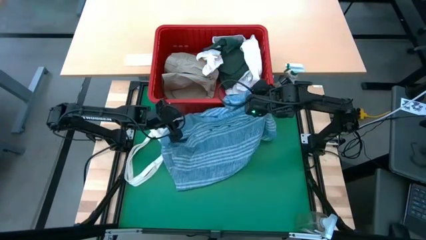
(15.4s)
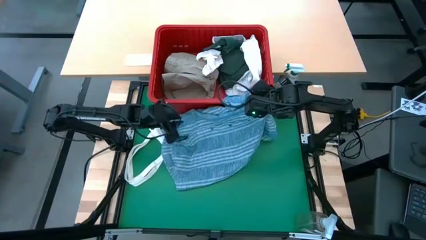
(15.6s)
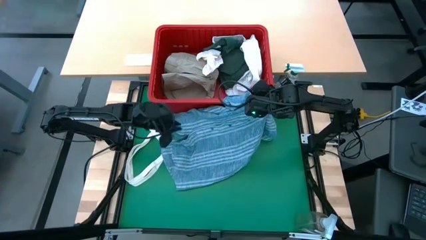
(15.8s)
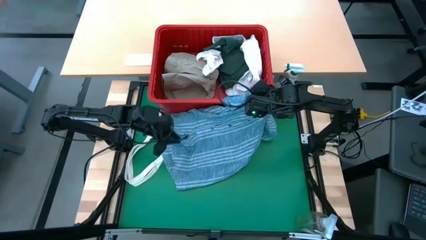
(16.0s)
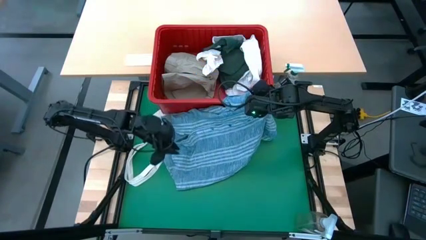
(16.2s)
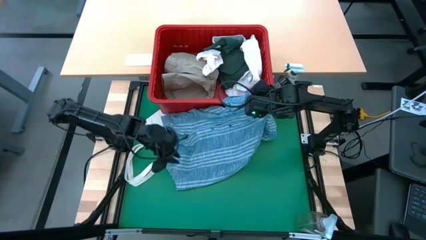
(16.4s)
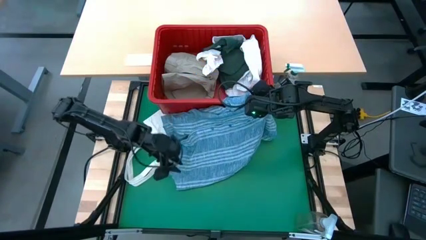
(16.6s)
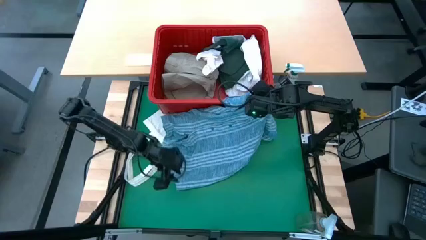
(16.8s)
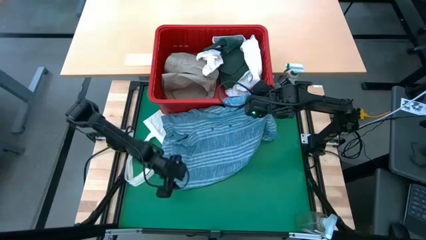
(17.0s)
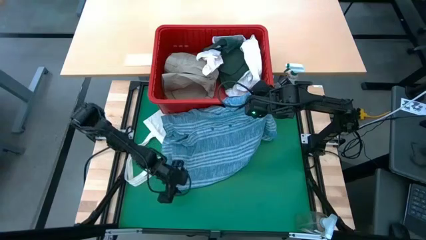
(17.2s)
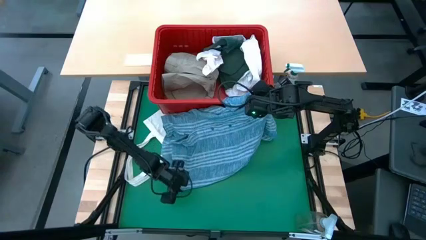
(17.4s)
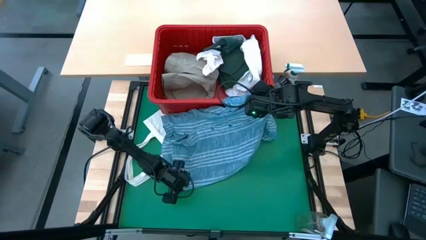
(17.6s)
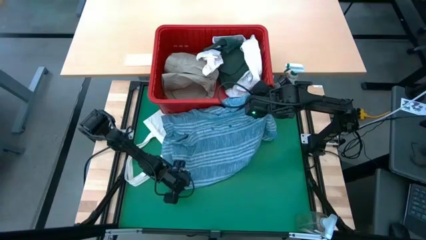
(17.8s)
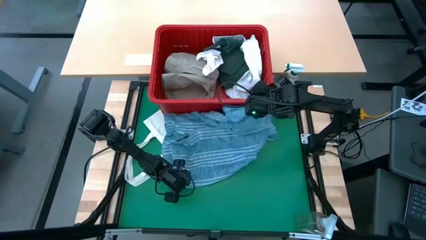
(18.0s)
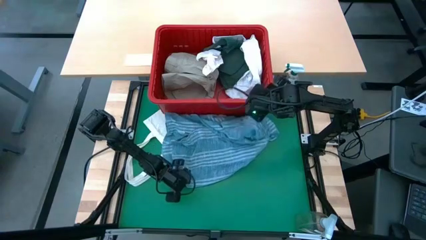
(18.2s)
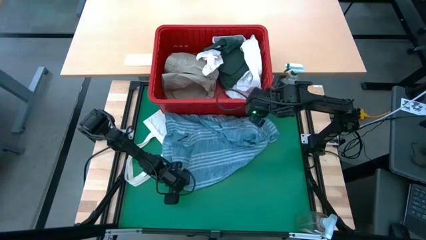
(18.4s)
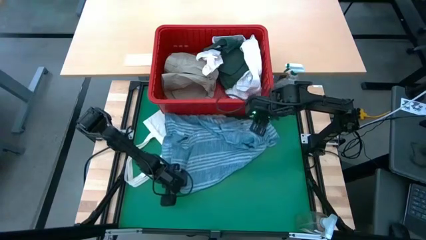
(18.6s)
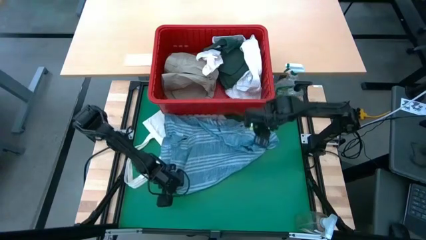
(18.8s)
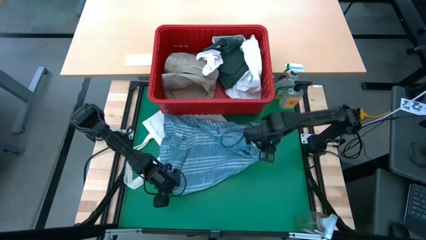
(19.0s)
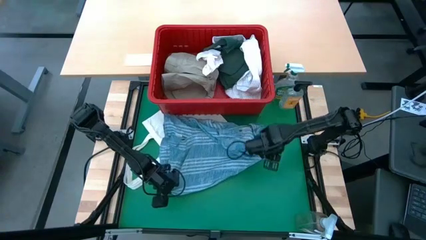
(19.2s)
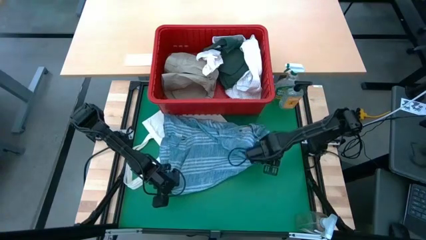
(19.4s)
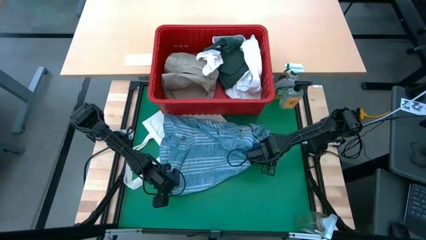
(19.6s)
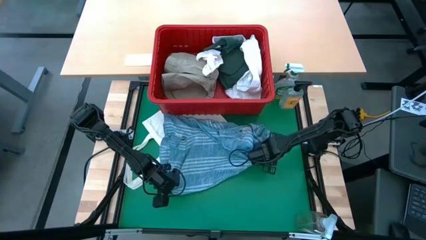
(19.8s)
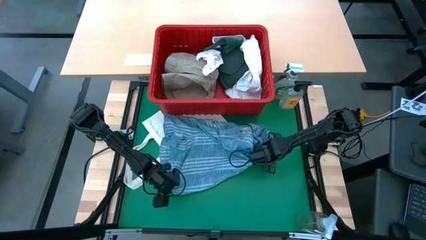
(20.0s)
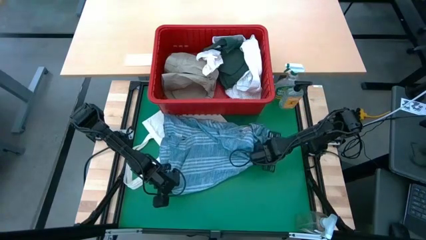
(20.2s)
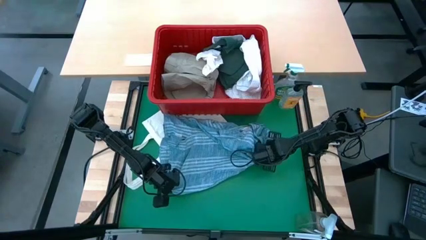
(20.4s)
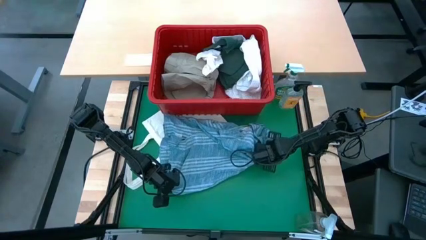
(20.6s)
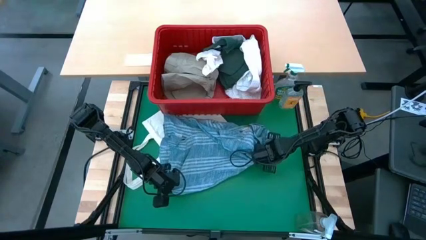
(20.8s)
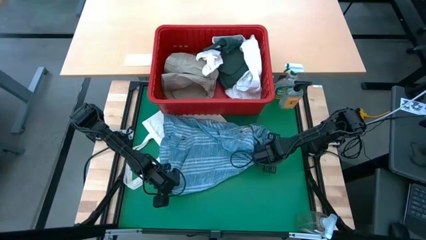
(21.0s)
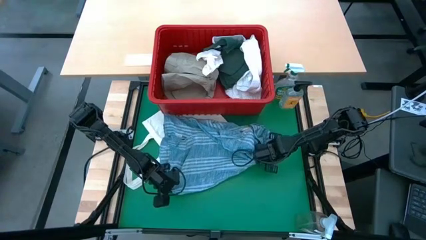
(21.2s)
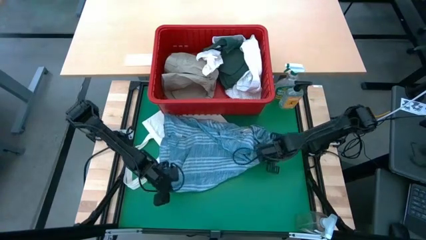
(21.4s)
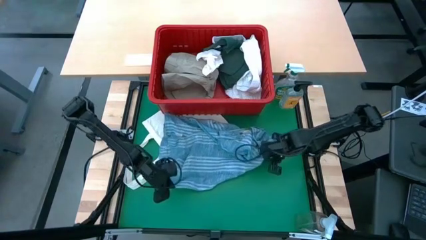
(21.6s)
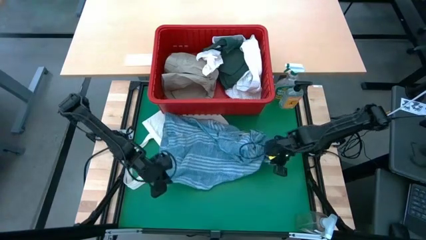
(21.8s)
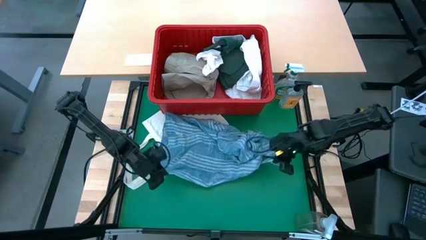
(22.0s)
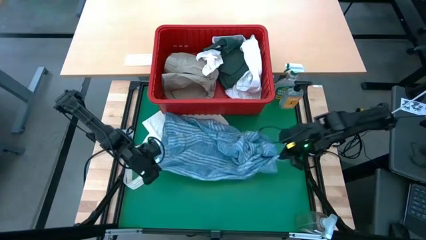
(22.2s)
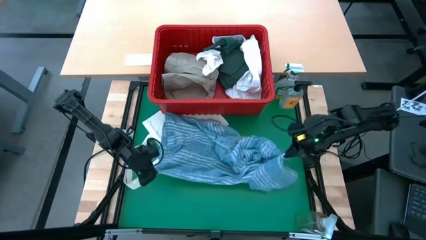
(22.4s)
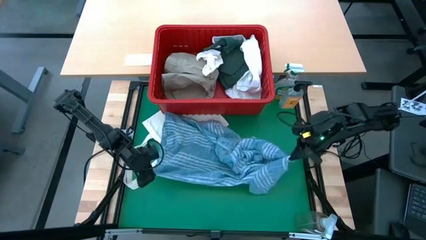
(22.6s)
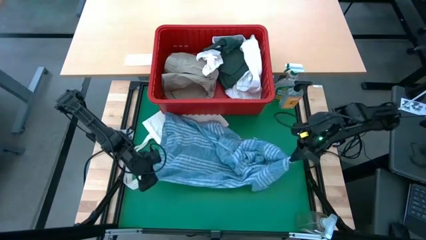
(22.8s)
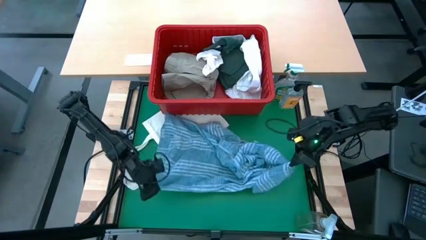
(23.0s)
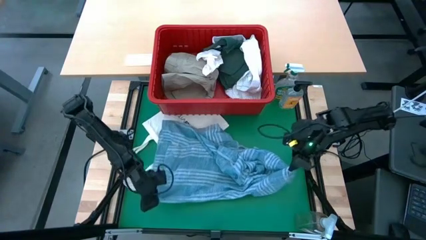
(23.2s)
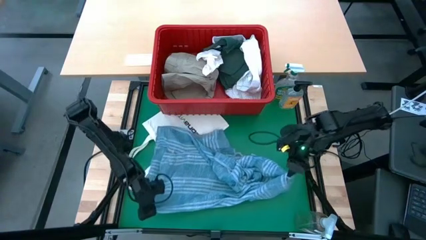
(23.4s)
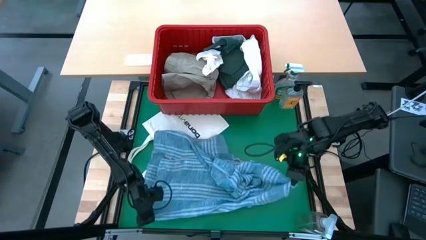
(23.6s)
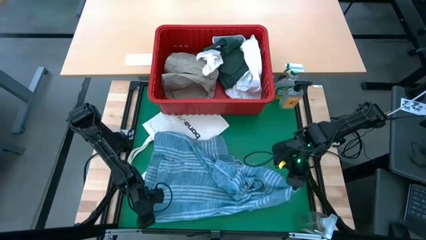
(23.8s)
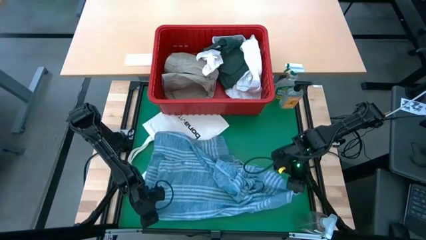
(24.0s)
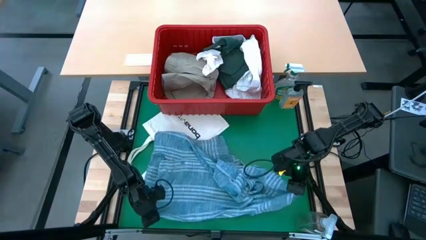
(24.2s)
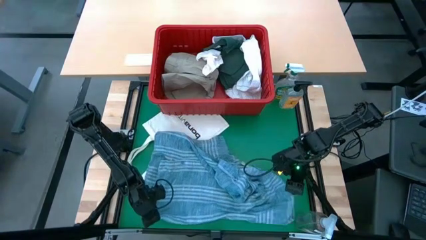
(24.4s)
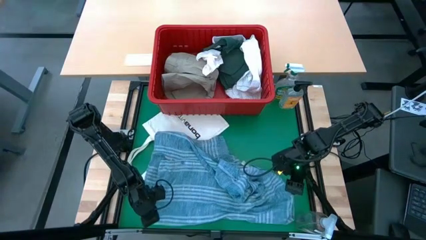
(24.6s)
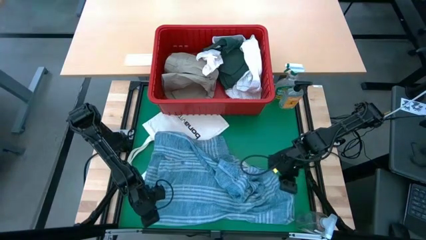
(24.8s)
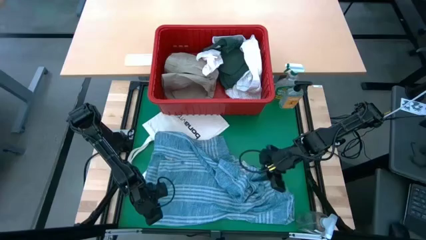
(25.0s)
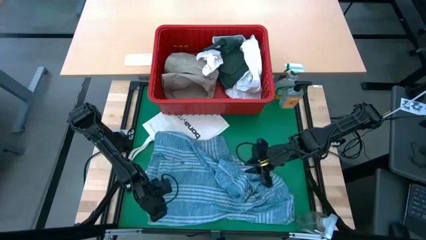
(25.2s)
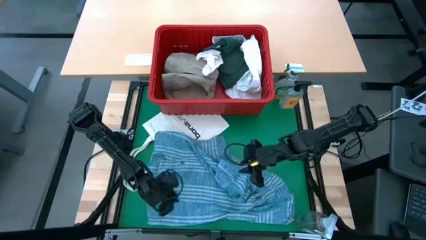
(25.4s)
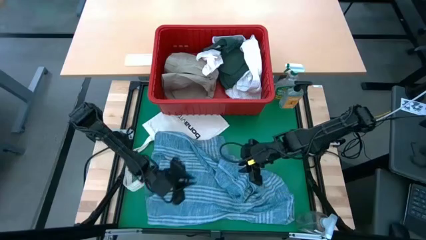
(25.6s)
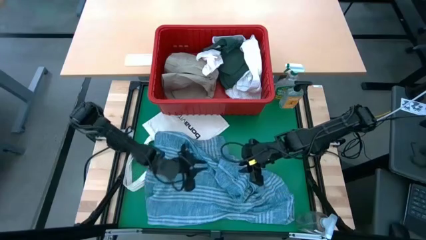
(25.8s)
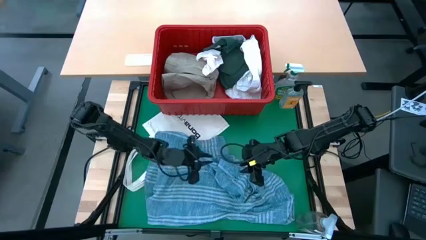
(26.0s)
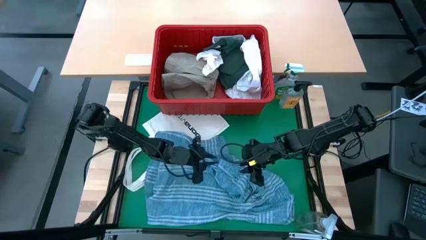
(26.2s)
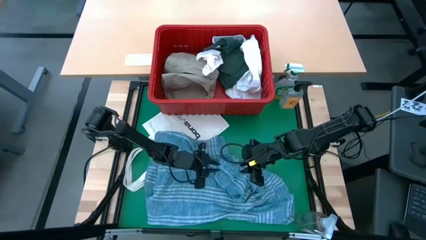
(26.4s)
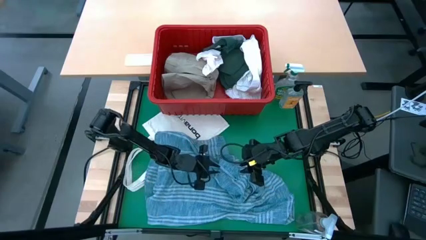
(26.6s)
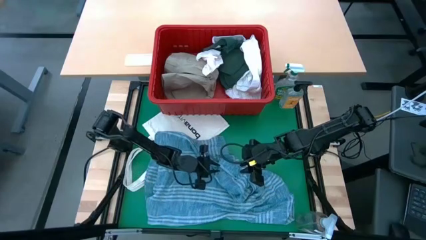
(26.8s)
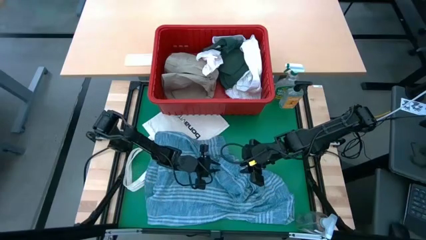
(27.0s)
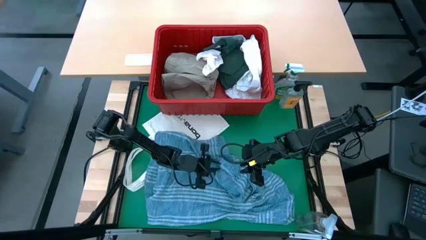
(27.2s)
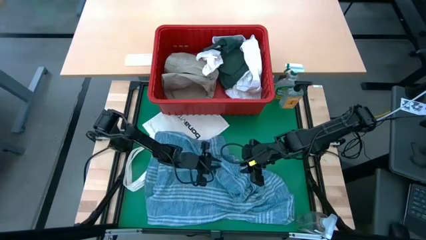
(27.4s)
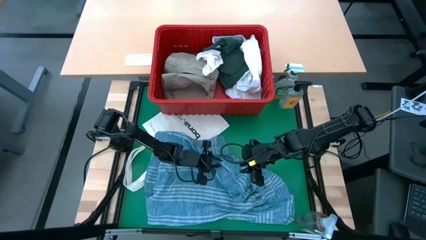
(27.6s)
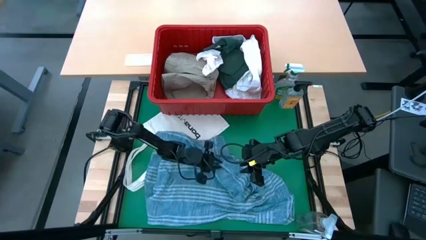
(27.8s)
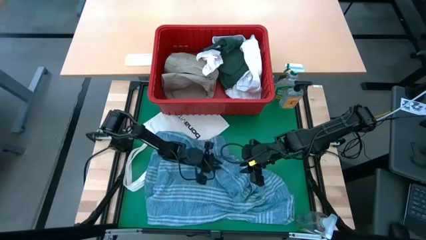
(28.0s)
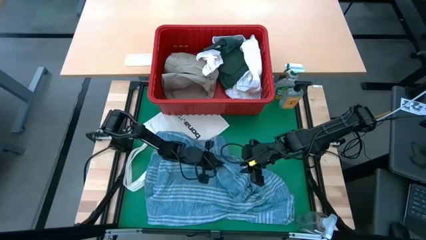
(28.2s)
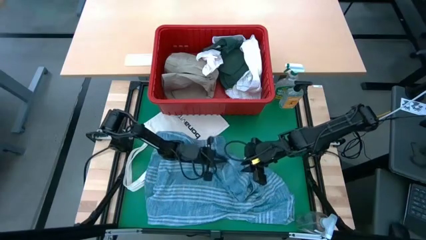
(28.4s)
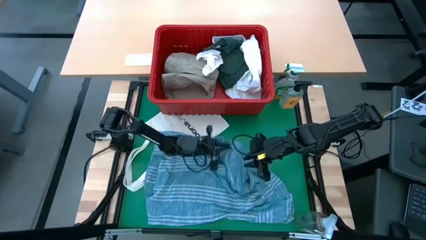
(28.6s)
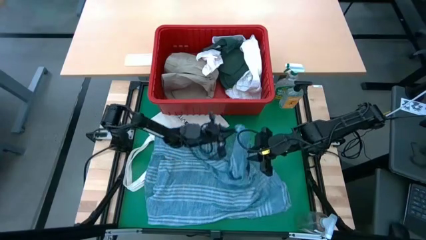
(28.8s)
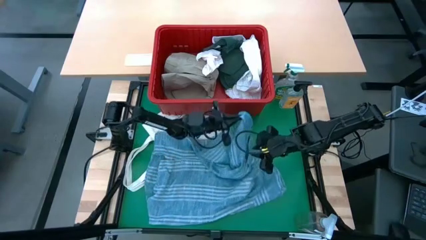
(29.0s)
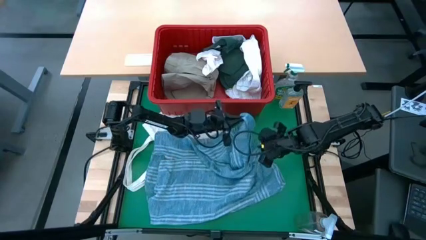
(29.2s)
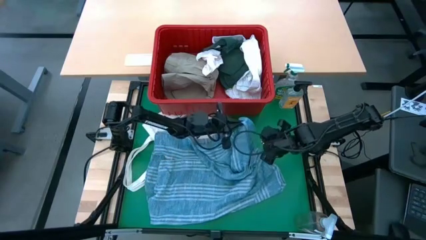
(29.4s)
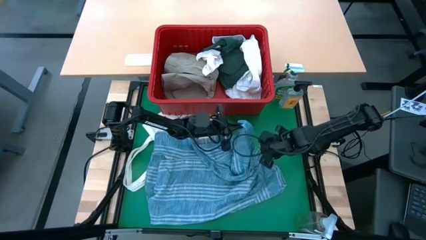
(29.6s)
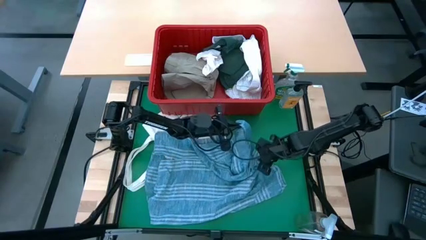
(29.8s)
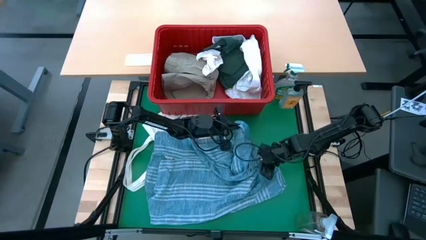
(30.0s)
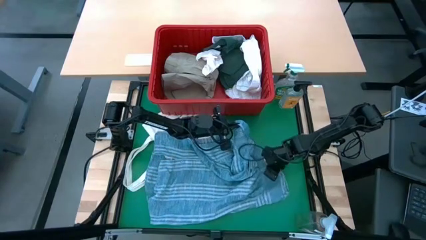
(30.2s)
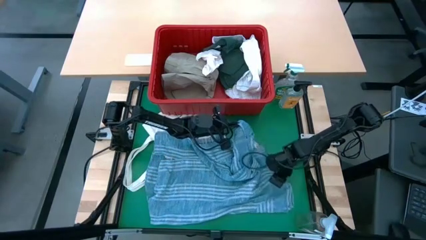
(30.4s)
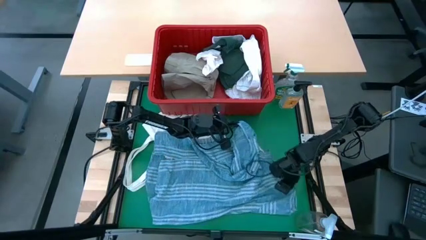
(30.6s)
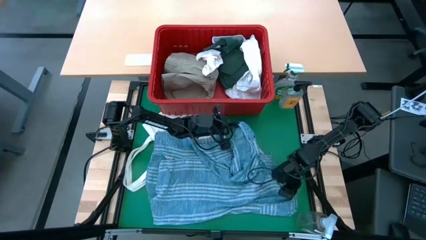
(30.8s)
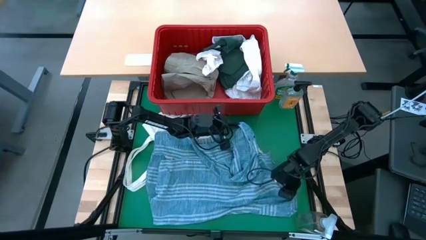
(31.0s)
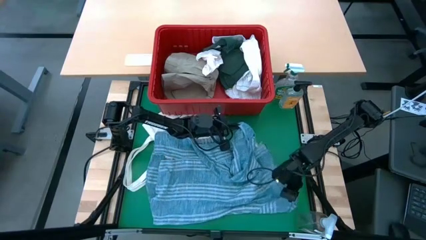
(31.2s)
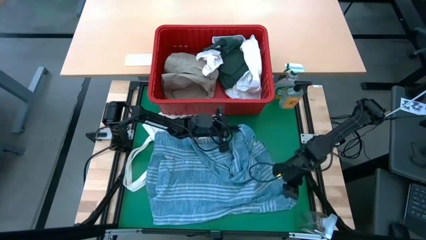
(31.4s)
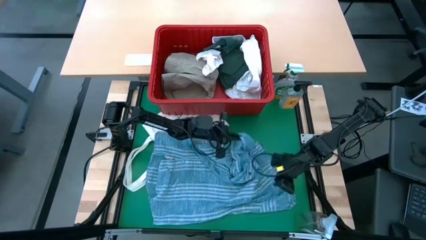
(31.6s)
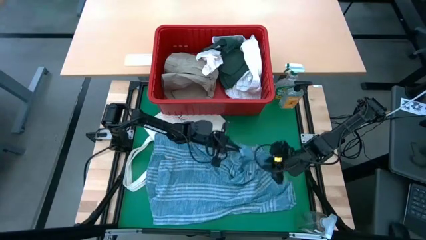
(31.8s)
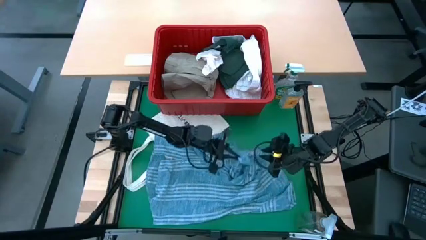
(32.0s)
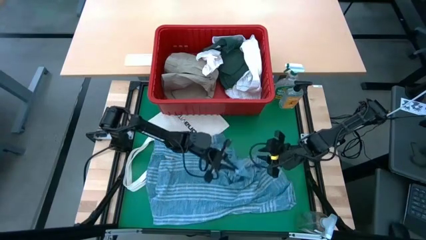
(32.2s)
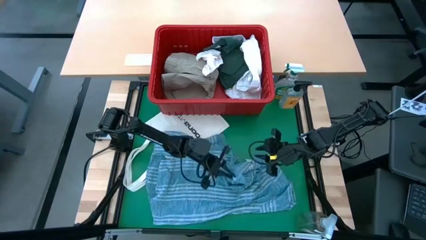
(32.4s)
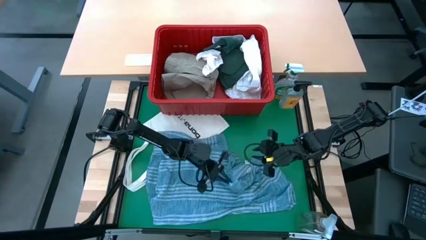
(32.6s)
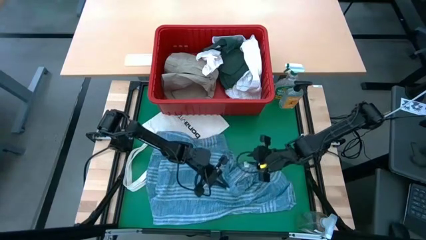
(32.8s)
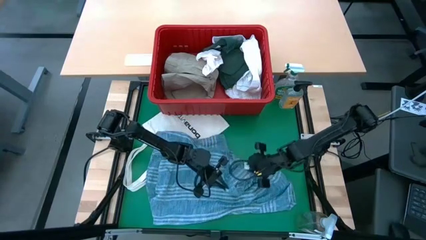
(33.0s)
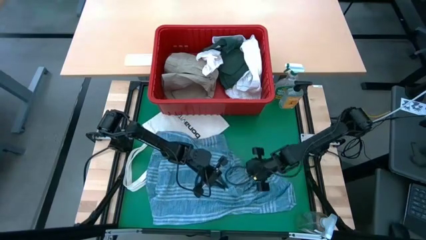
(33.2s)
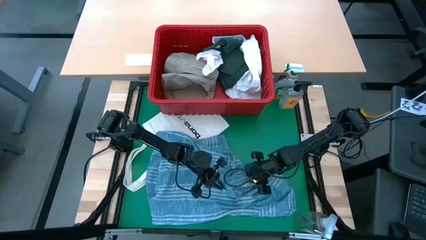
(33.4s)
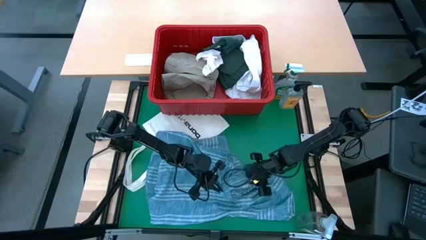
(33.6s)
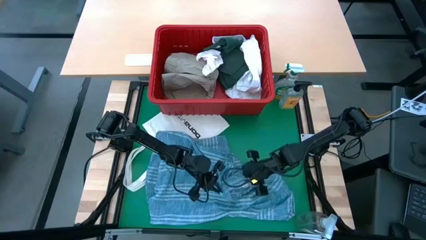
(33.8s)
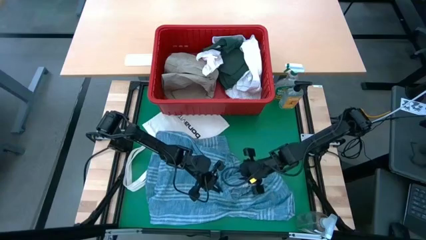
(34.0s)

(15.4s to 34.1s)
Task: Fold Laundry from Bin
Fold the blue polo shirt
